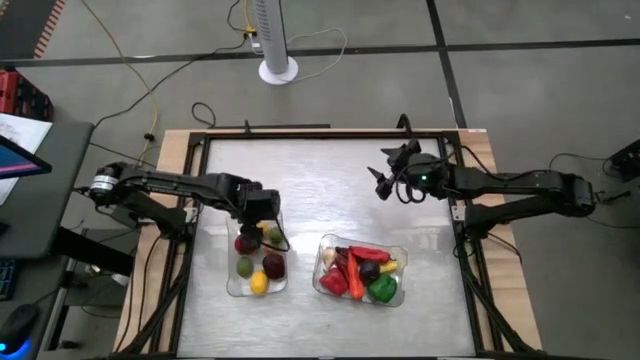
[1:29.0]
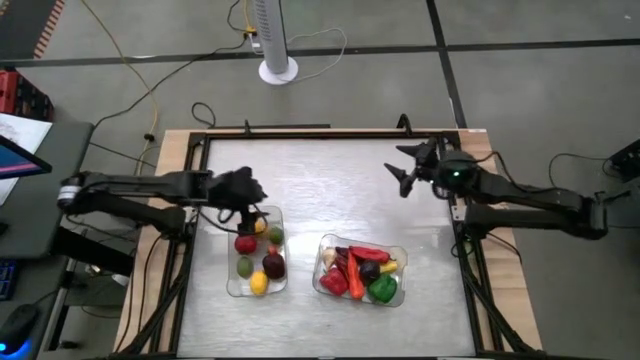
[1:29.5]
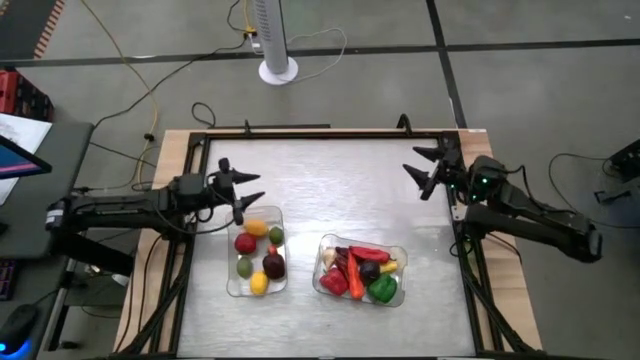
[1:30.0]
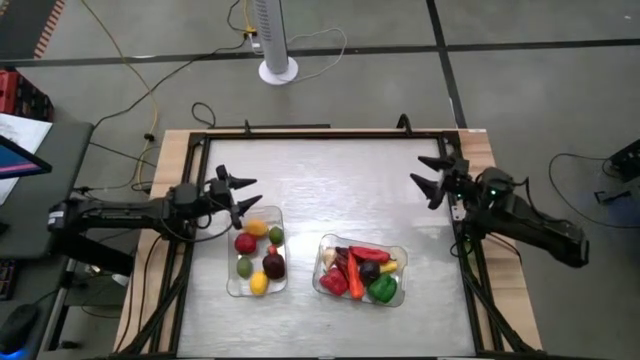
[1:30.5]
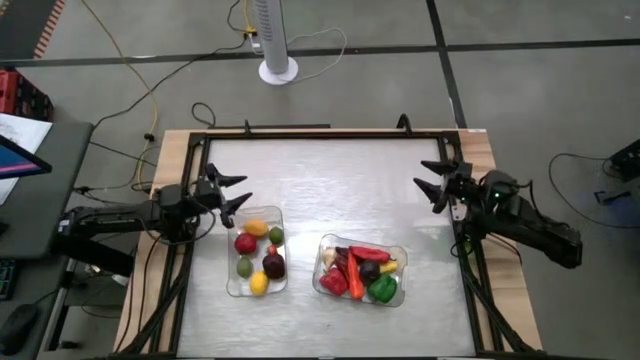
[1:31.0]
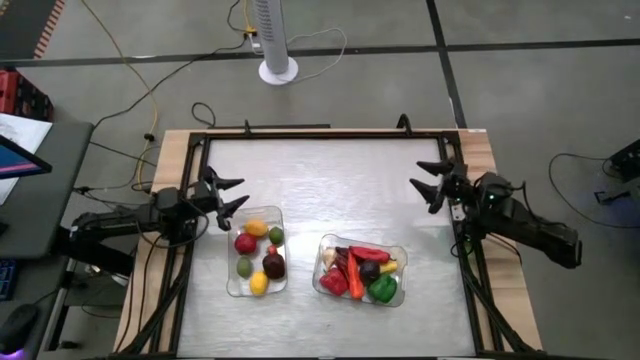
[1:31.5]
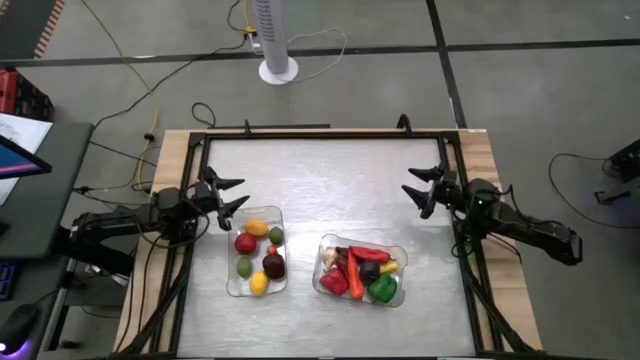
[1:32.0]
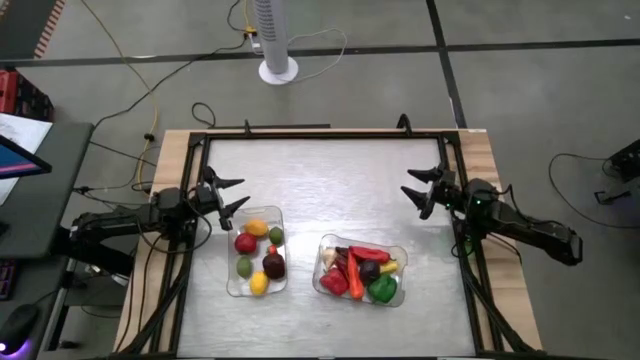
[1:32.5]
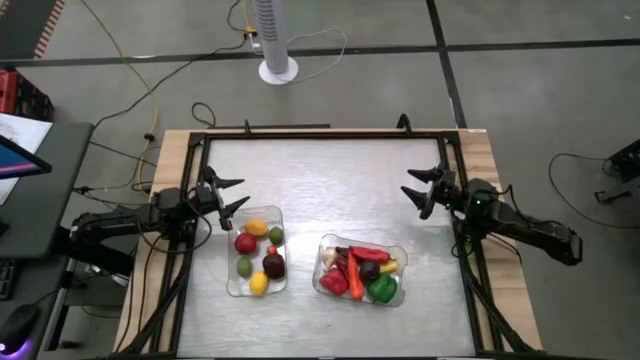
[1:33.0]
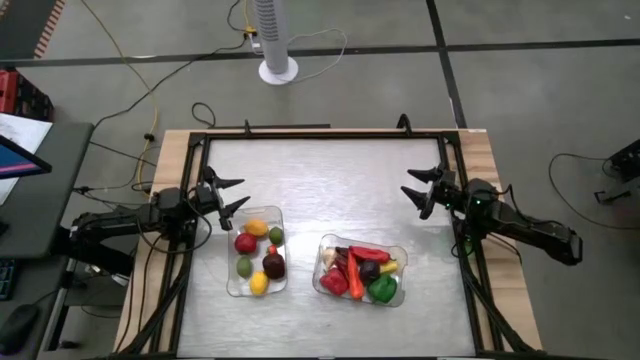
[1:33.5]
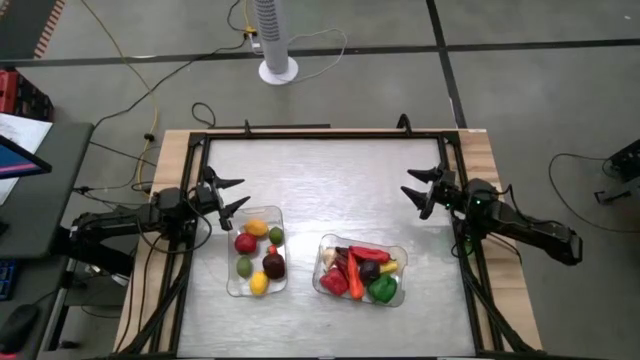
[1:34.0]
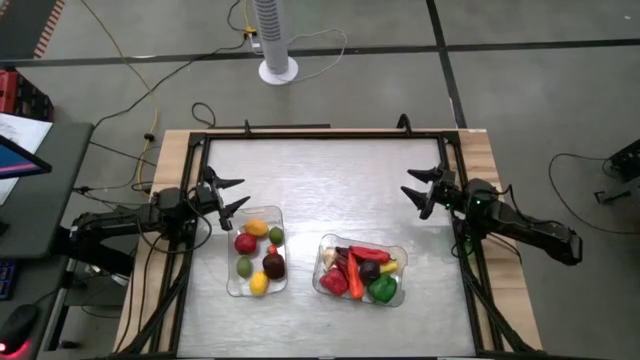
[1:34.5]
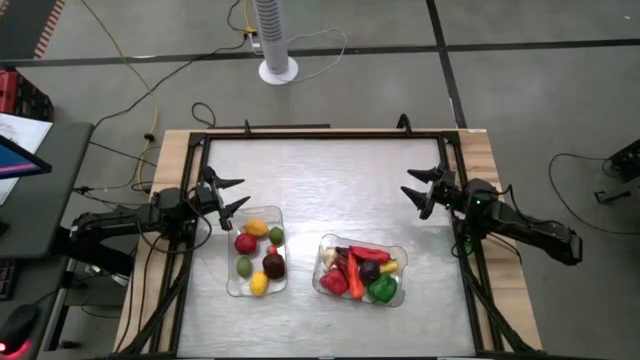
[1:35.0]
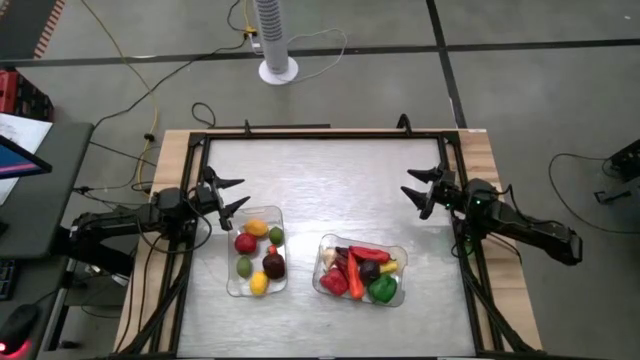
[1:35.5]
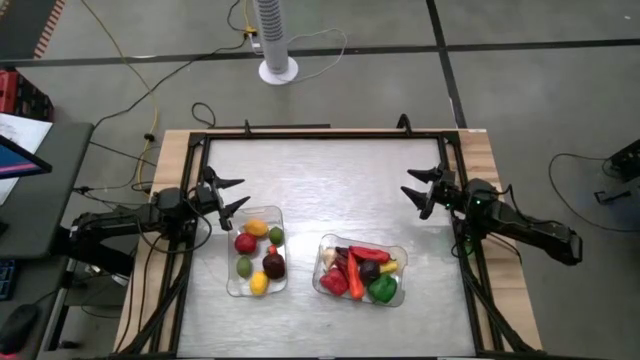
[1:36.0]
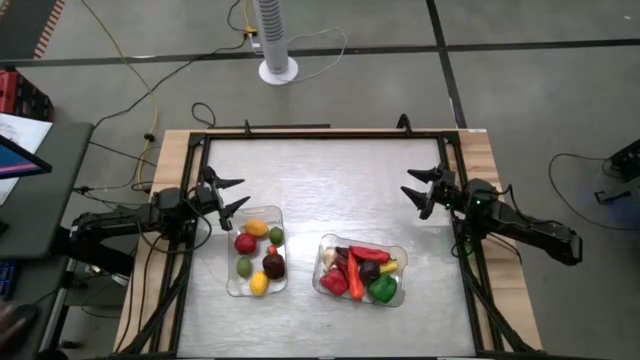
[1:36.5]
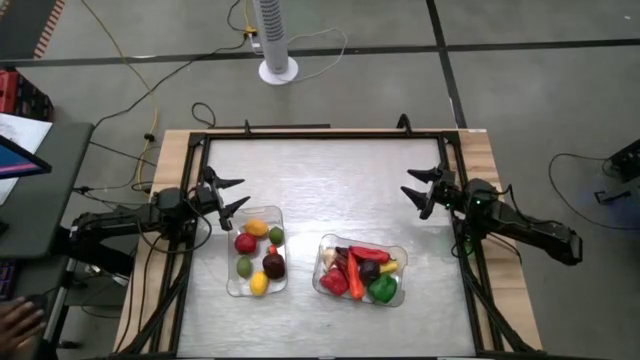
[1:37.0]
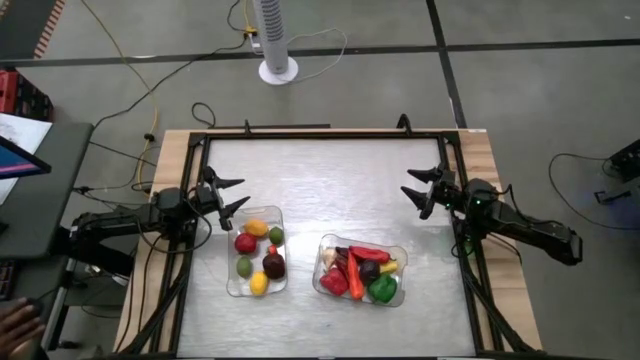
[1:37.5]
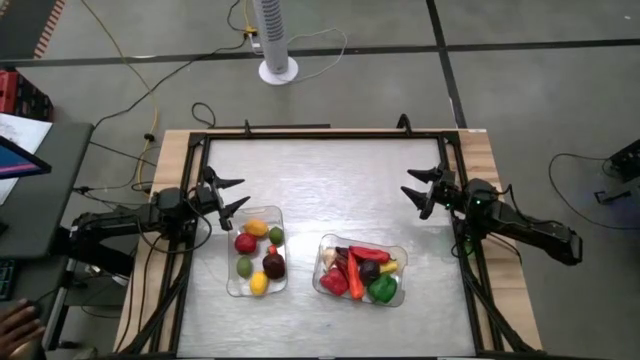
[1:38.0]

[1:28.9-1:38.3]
Task: Sort produce into baskets
Return to Home Position

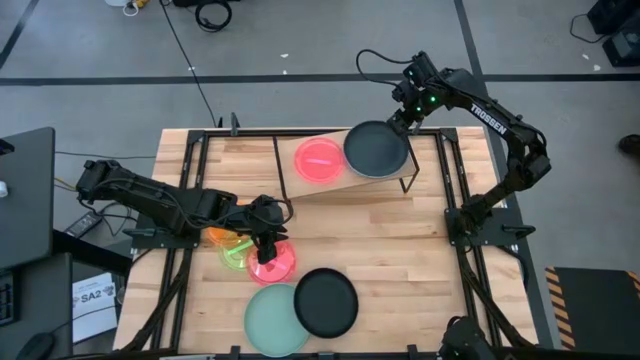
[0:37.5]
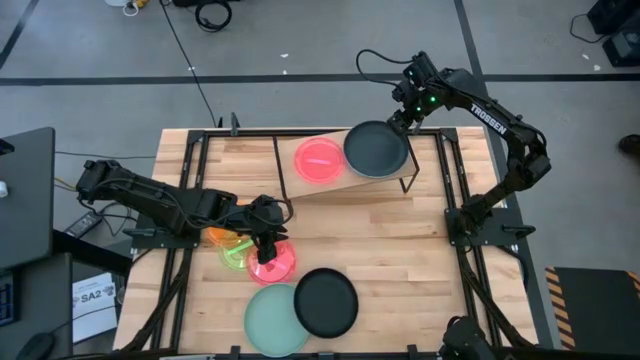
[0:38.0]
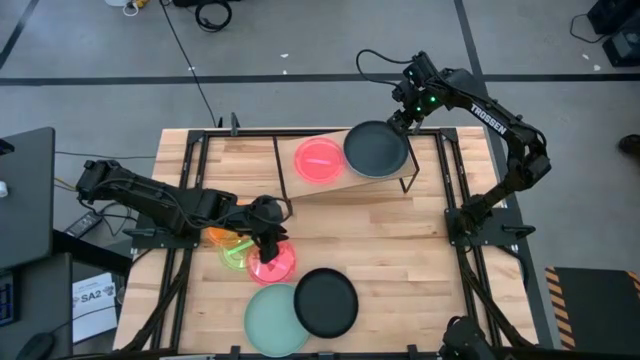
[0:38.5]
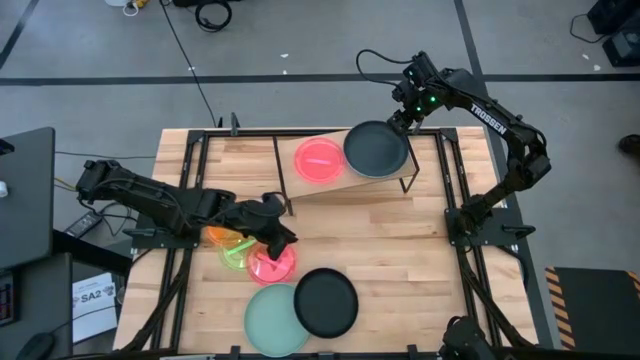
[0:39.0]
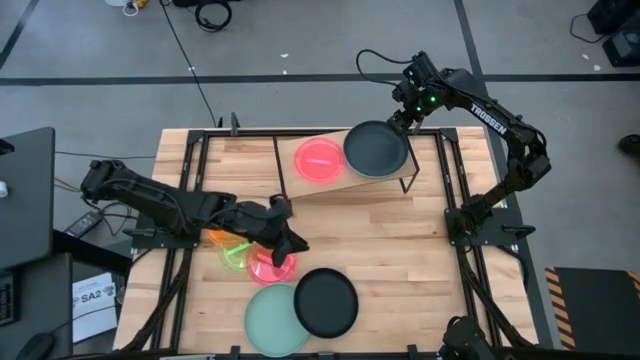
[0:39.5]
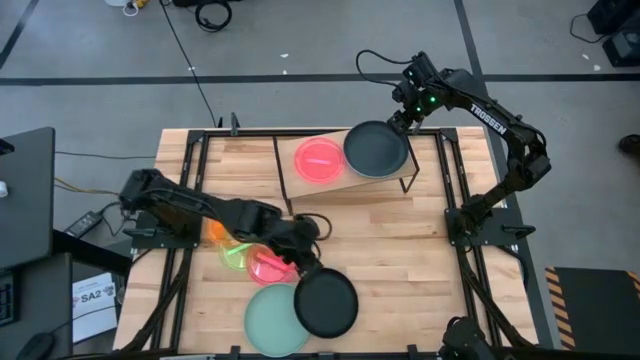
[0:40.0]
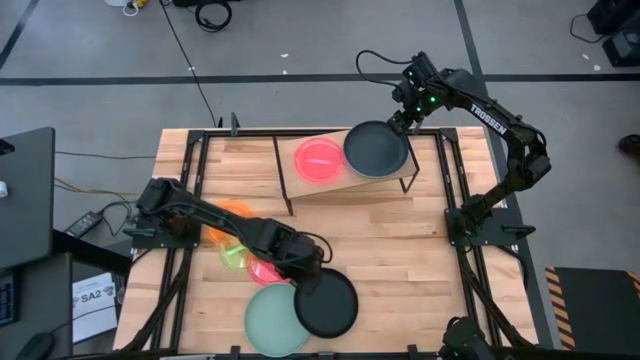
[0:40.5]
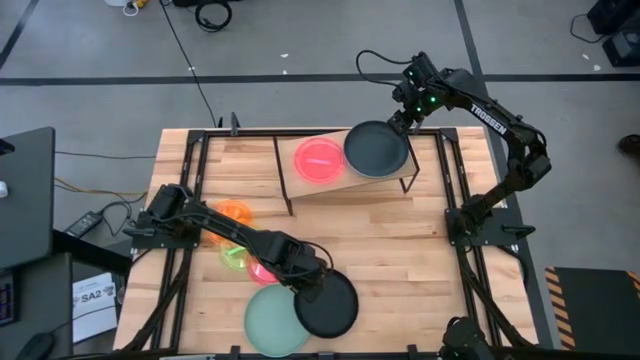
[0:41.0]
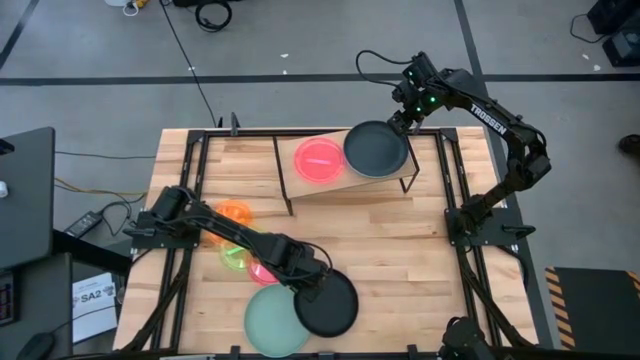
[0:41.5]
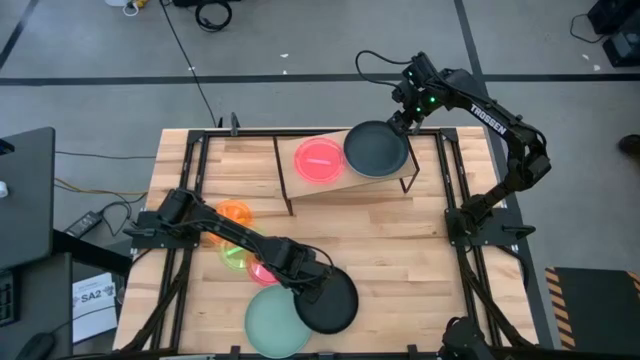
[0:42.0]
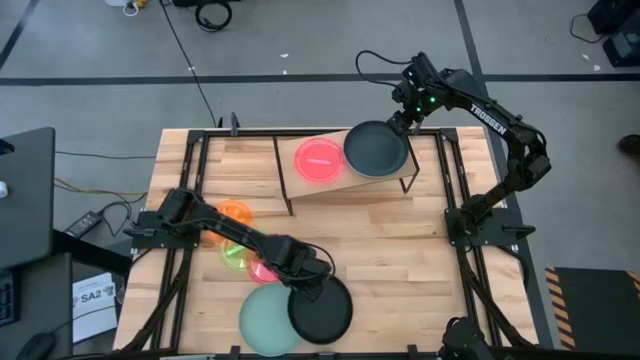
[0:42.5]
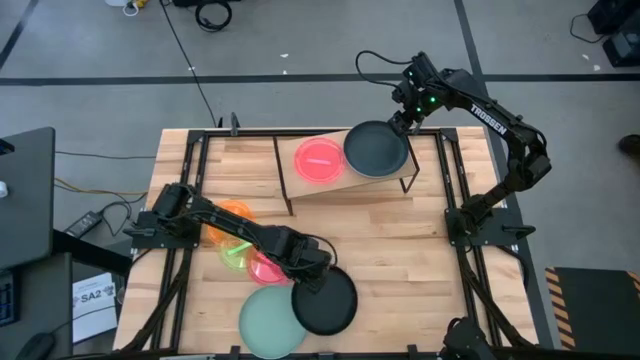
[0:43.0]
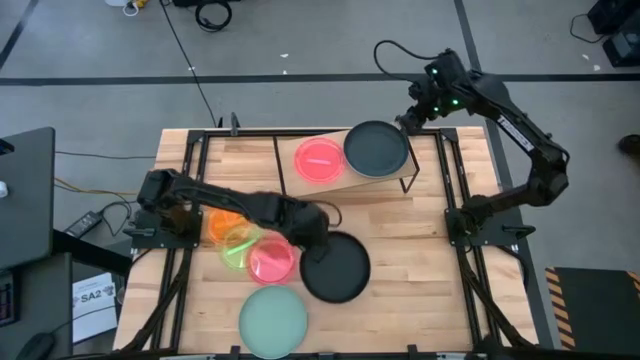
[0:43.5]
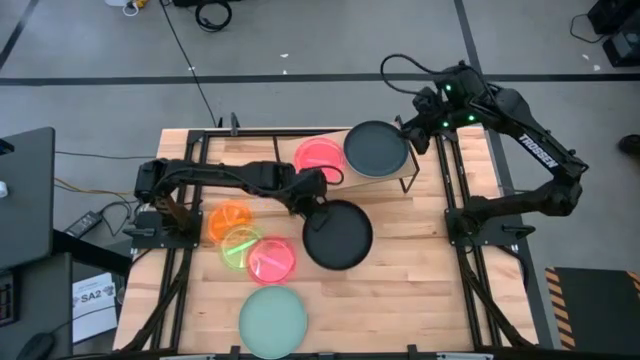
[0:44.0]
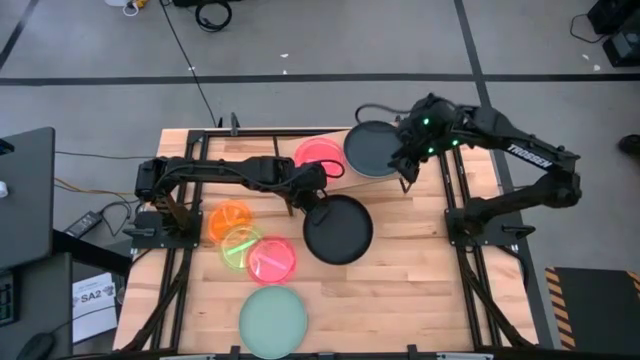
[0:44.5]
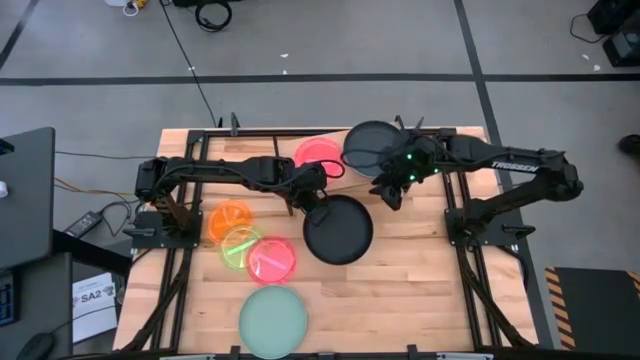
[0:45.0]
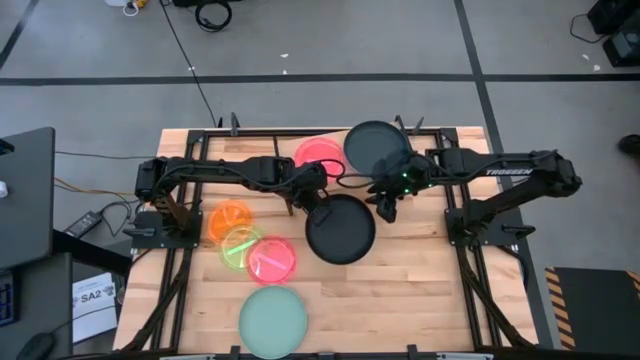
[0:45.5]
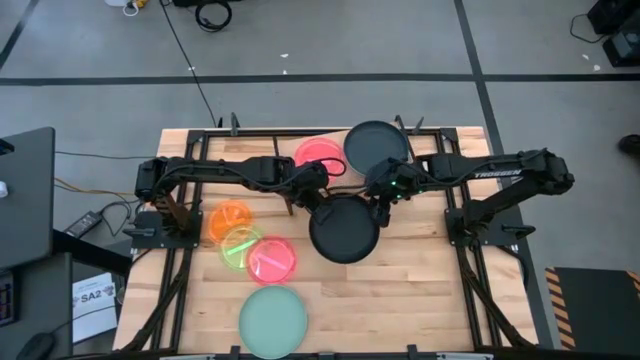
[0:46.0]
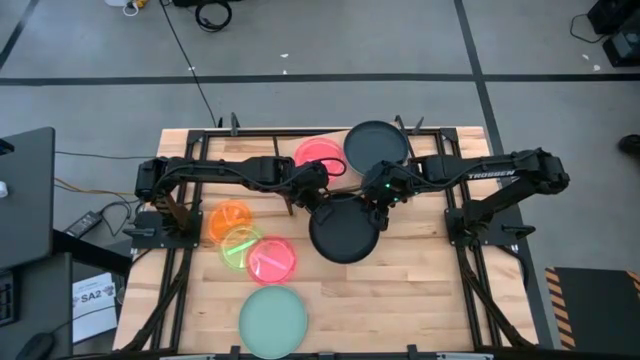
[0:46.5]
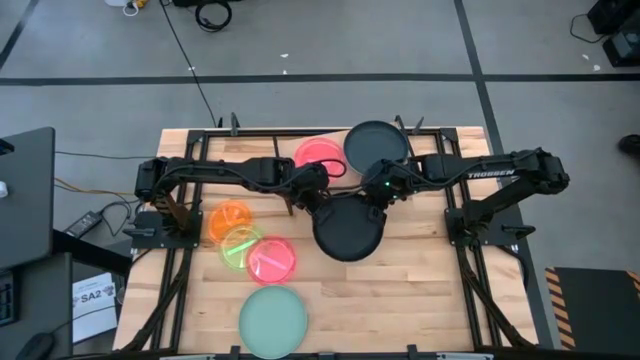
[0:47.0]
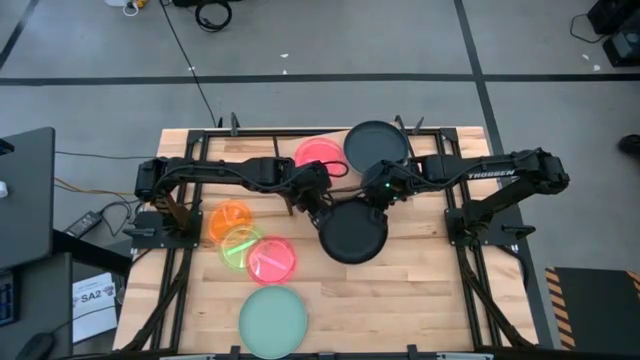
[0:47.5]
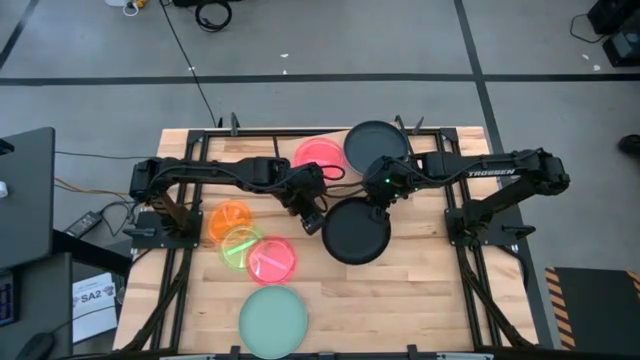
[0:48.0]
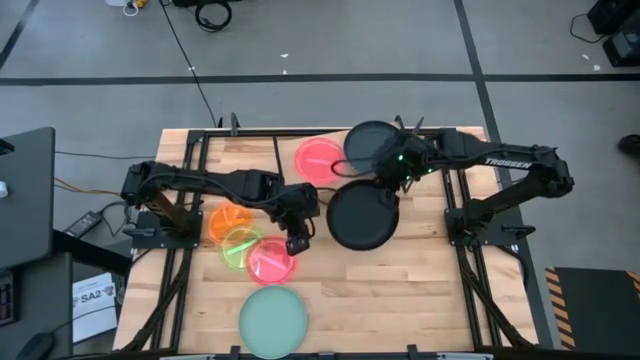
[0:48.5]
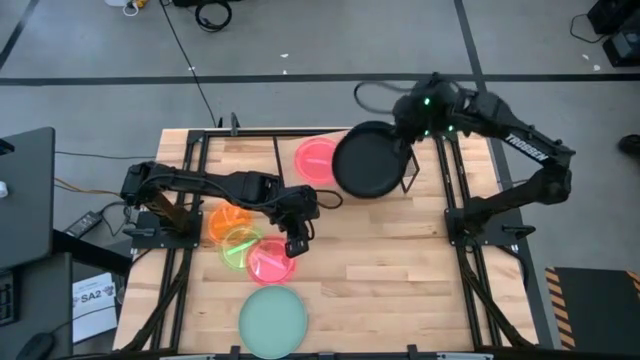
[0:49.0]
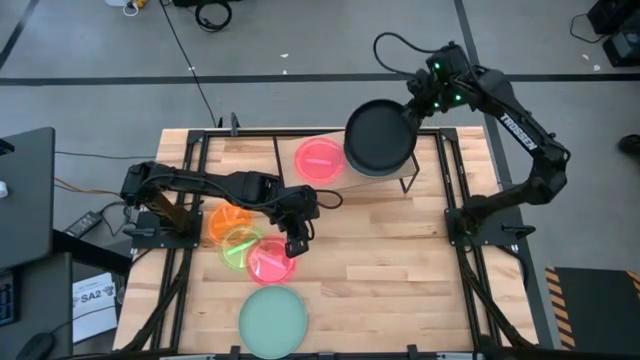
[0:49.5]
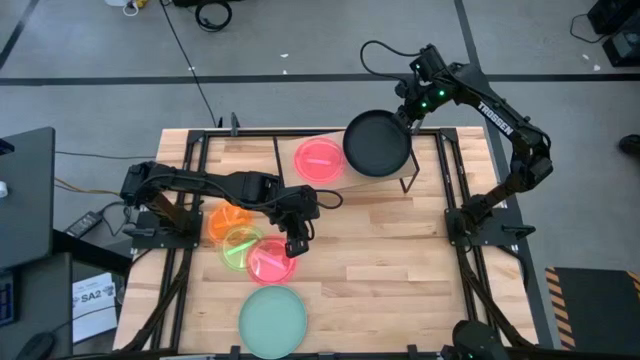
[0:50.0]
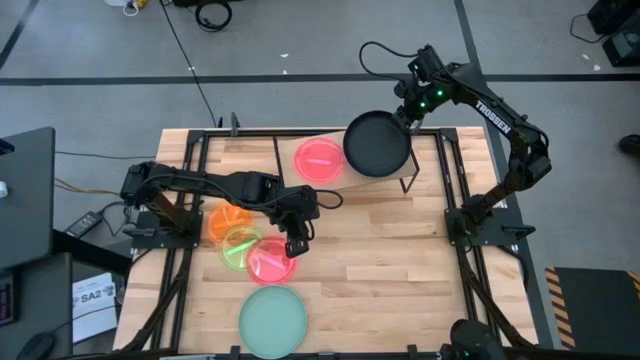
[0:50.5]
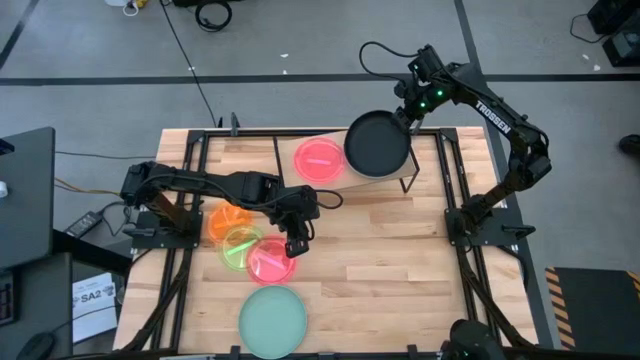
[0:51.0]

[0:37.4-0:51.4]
Task: Place and stack plates onto a shelf
Stack the large black plate on top of the large black plate on the shelf
